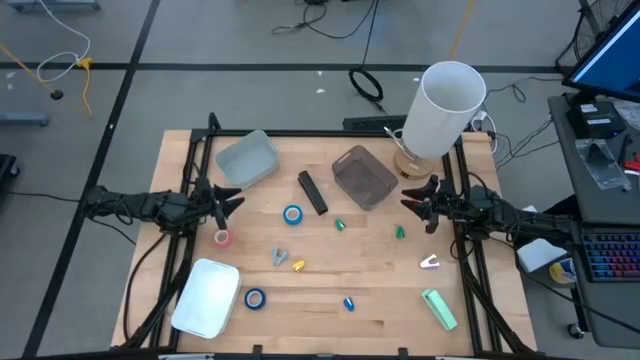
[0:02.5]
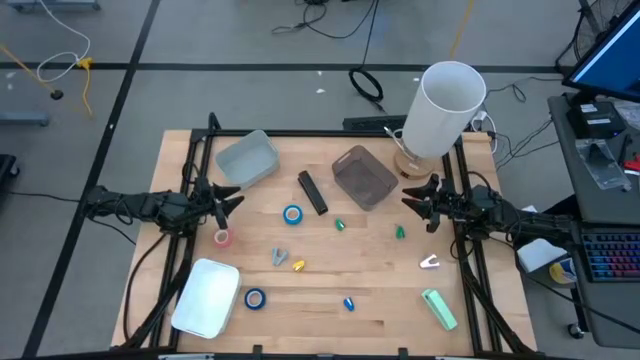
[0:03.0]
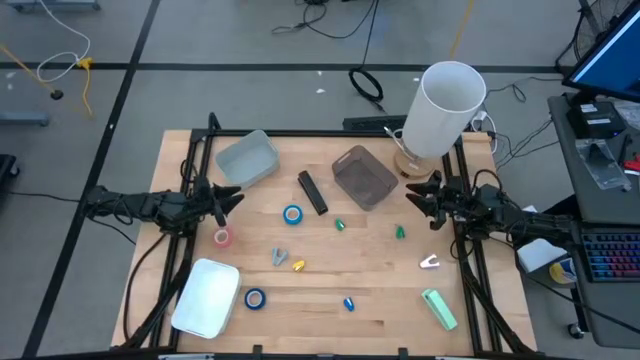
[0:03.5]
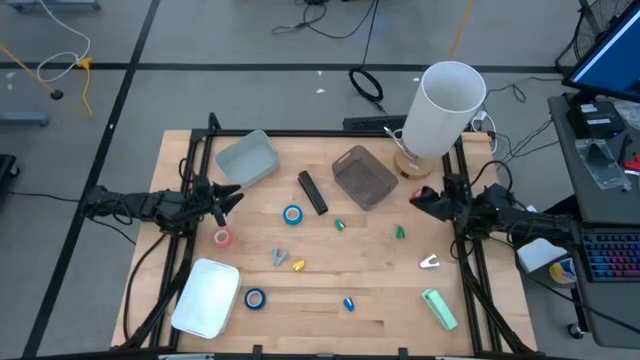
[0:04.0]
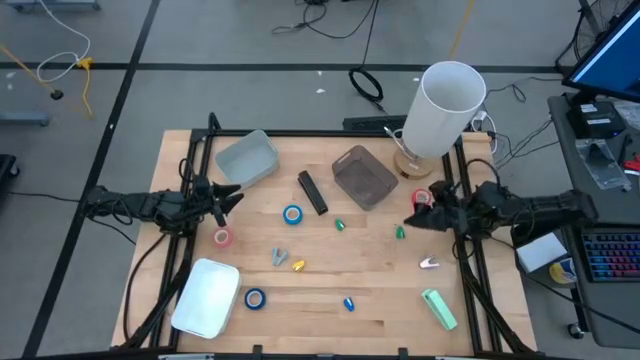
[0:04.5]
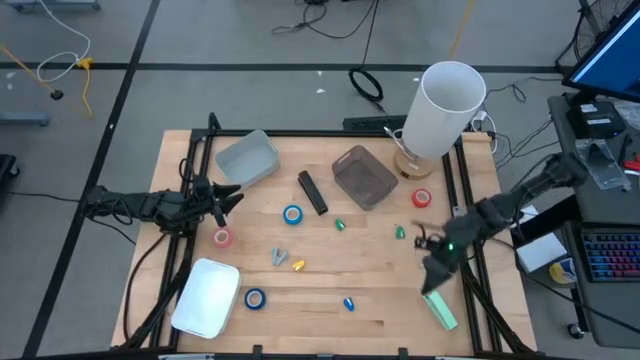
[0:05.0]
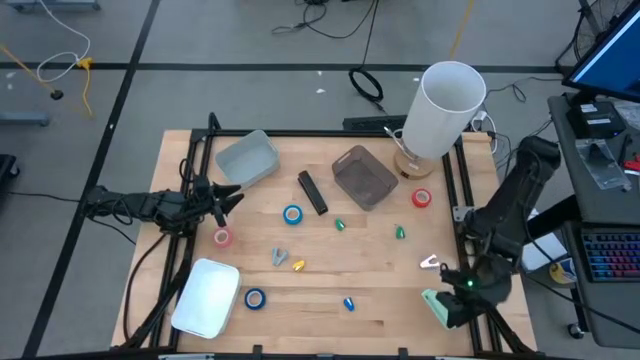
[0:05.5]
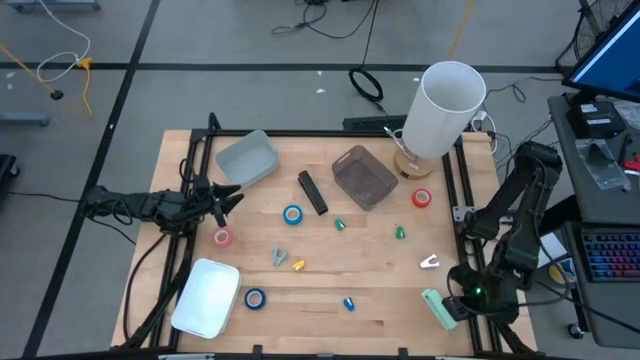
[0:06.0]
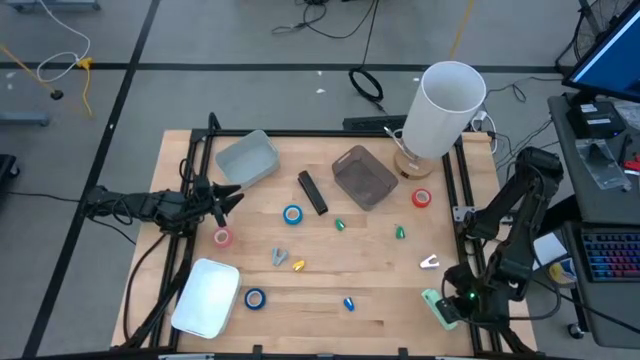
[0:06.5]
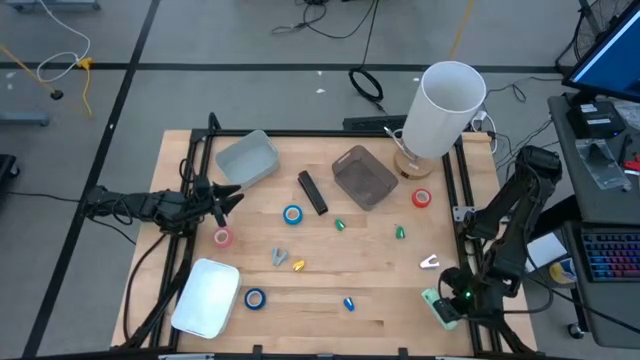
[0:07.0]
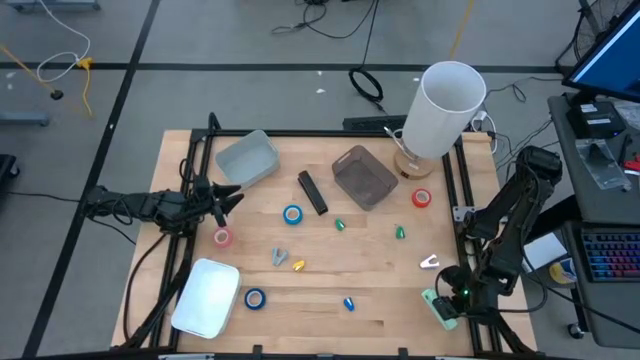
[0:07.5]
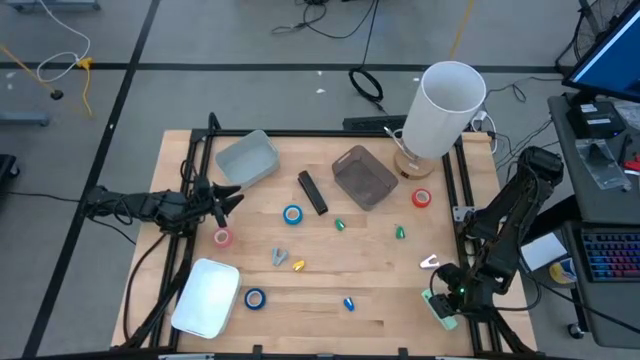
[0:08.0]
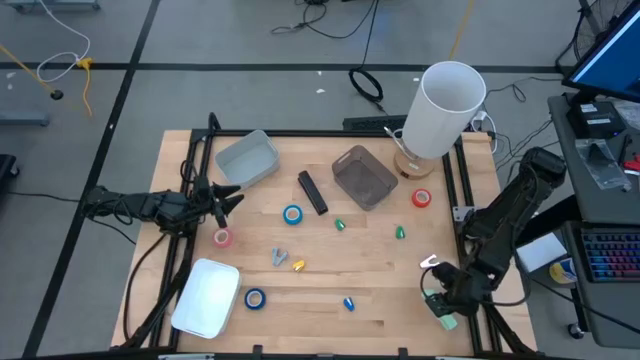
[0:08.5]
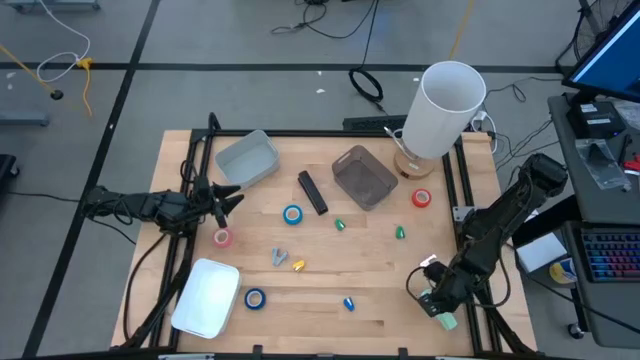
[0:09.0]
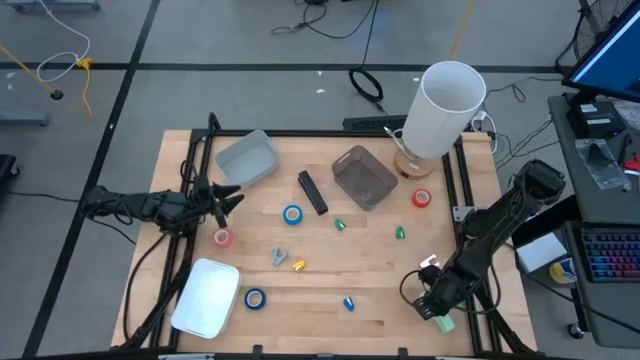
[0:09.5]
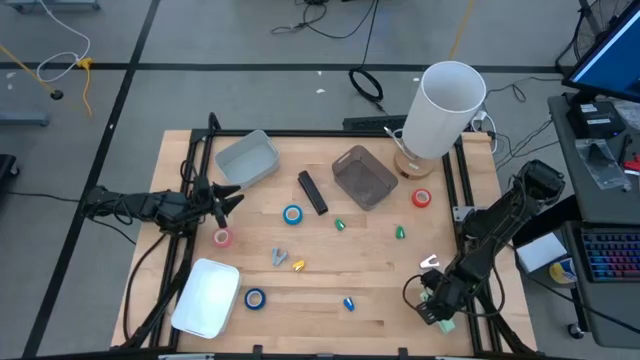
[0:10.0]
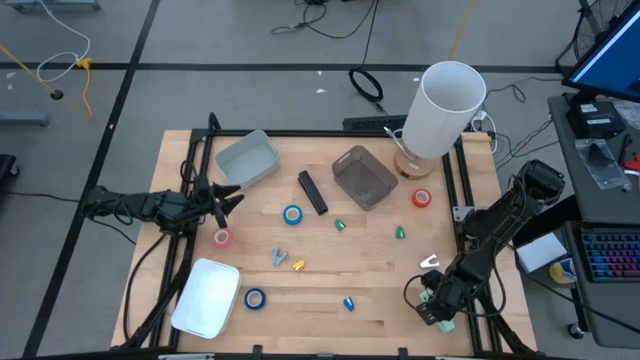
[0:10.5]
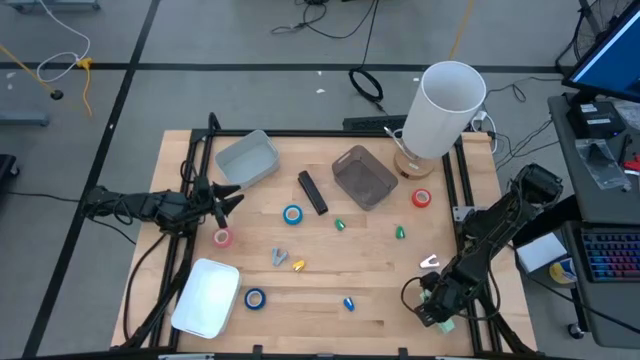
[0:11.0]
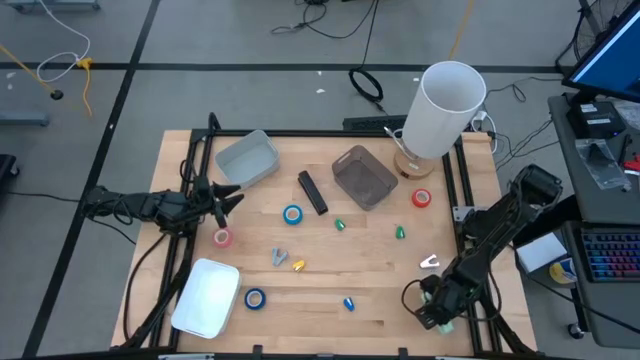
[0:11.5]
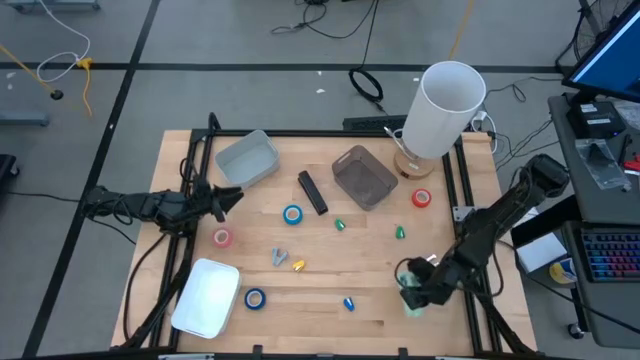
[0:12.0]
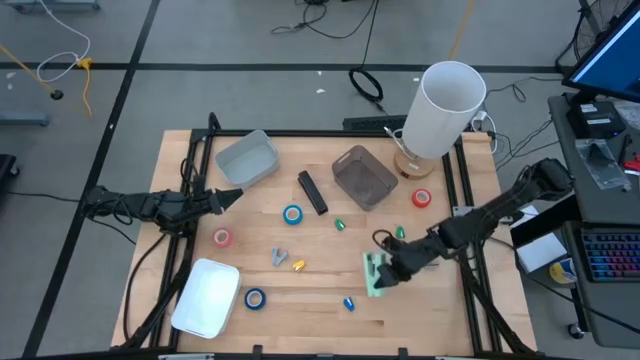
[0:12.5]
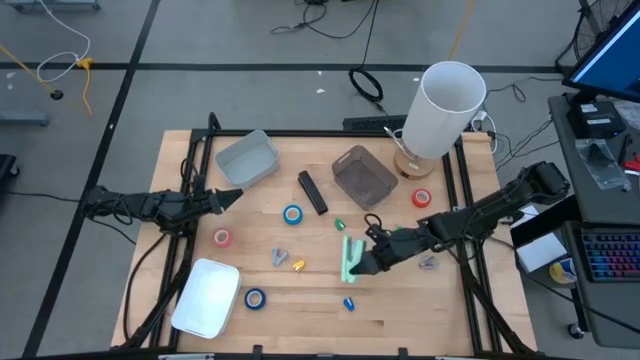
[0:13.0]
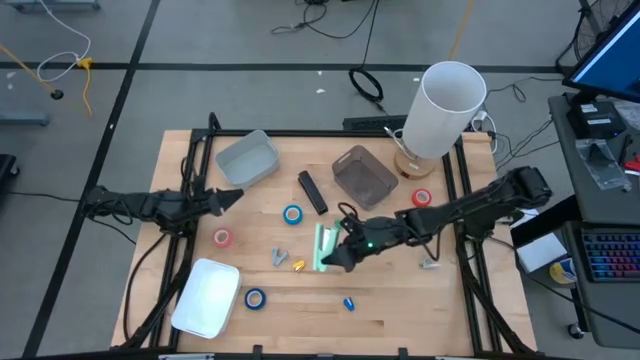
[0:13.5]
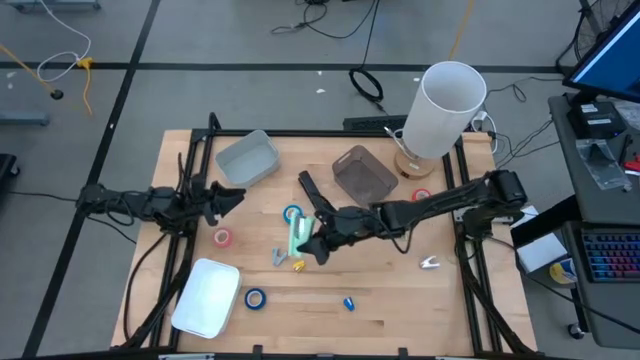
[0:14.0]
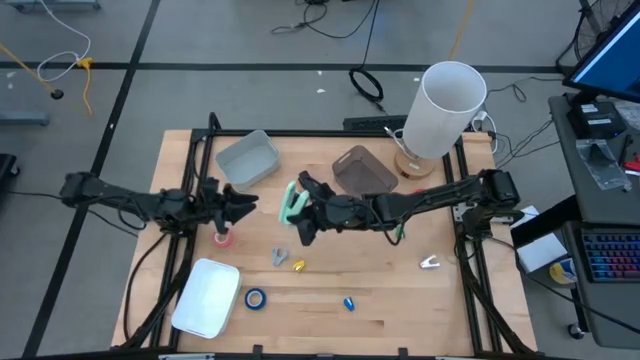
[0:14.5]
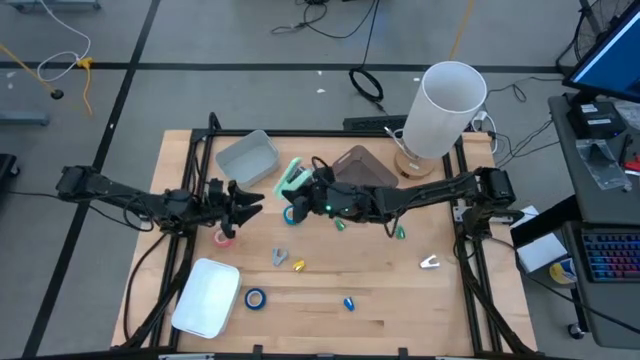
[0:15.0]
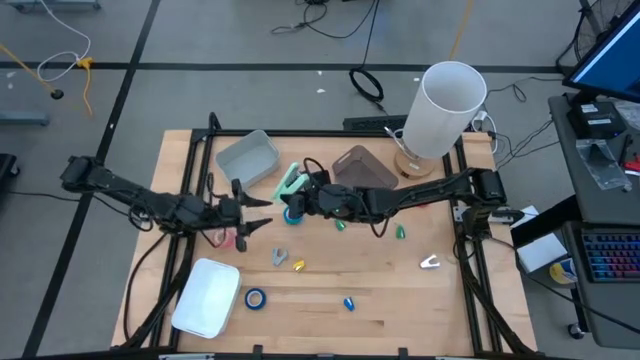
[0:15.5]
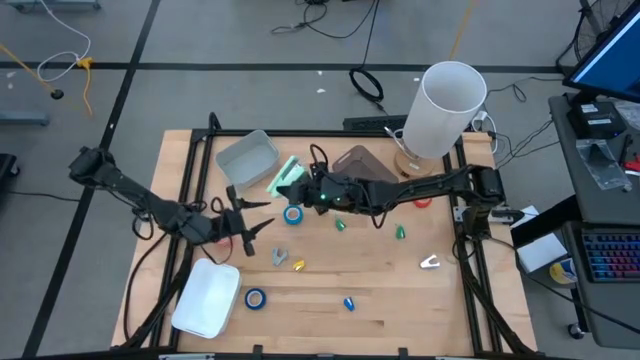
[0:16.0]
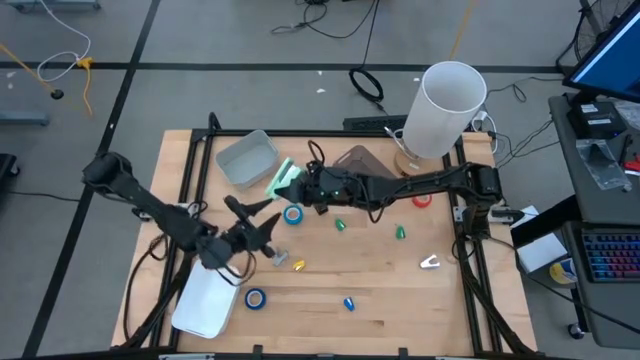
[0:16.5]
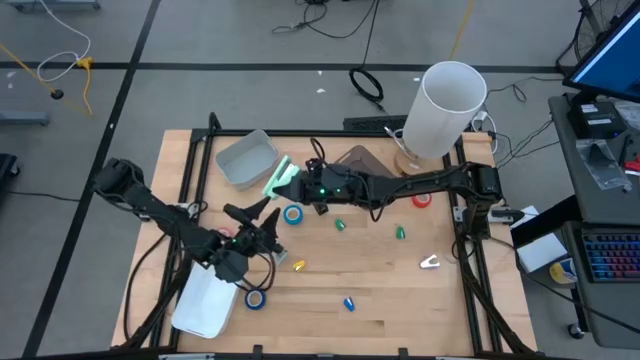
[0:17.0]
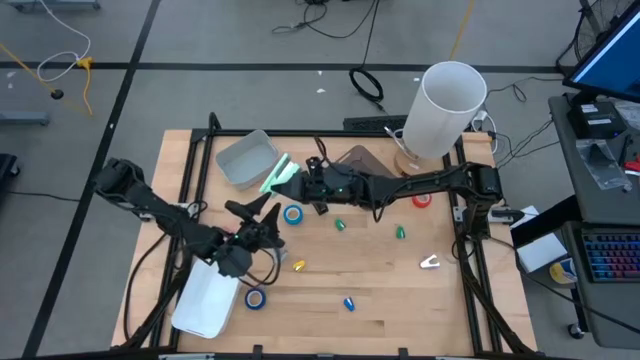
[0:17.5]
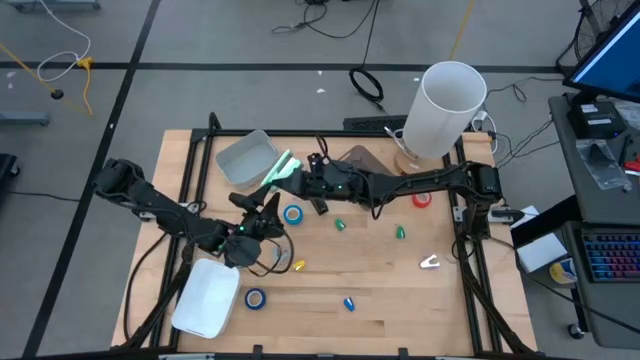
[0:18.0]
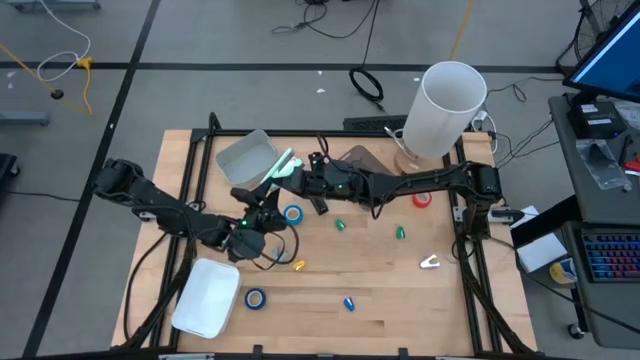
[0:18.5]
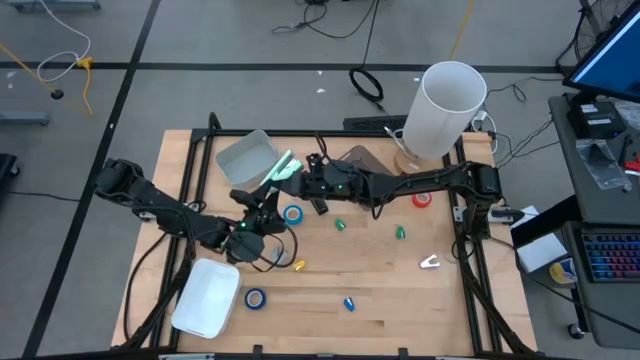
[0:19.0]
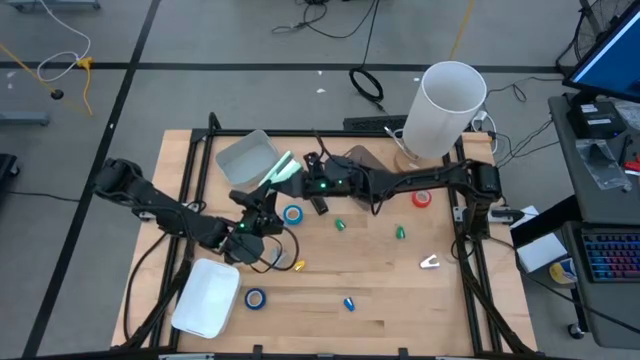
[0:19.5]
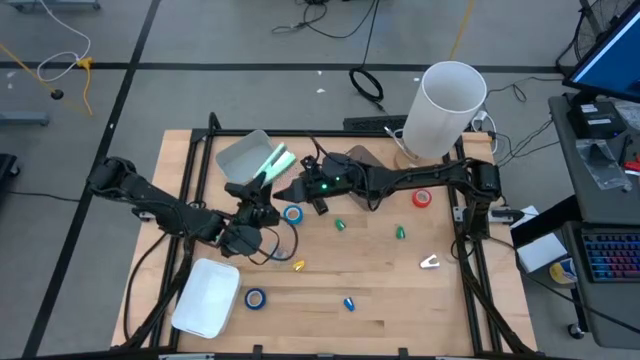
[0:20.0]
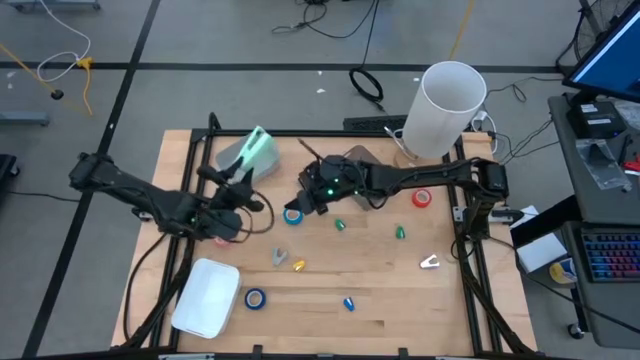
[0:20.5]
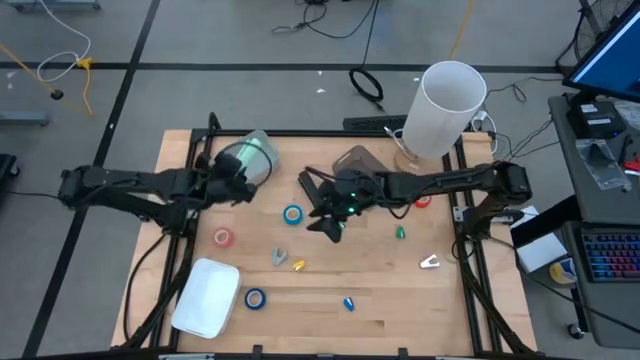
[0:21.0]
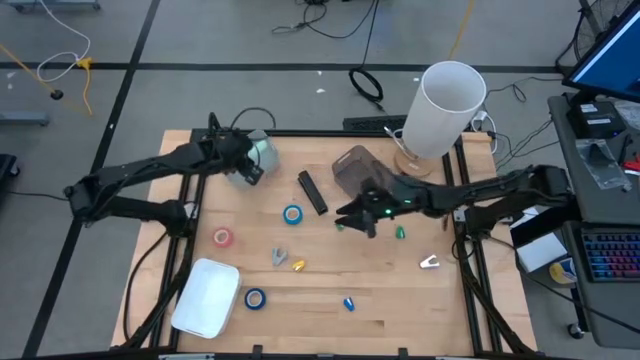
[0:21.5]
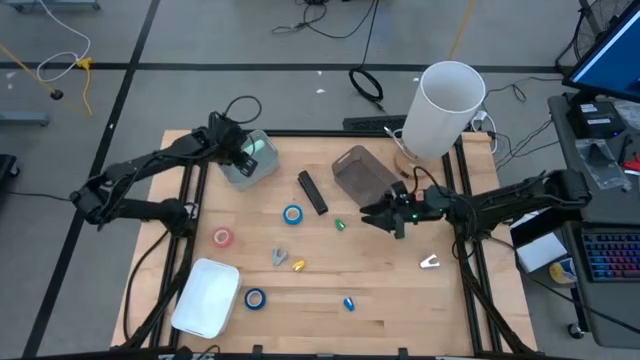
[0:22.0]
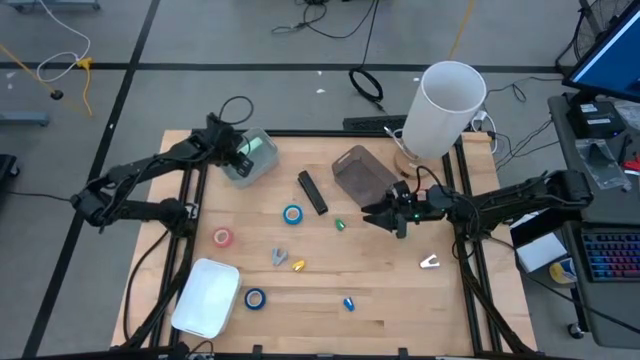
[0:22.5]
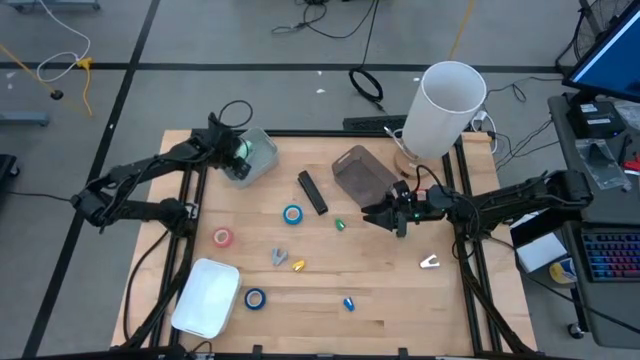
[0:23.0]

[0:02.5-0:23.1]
Task: Pick and place Stapler, Stapler remover, tape
Put the light green stapler into the gray bin
